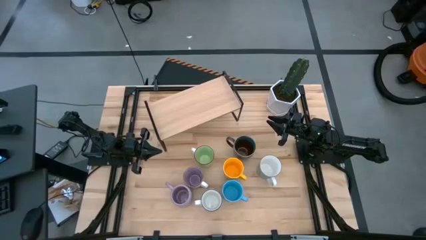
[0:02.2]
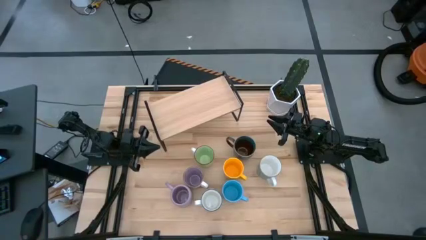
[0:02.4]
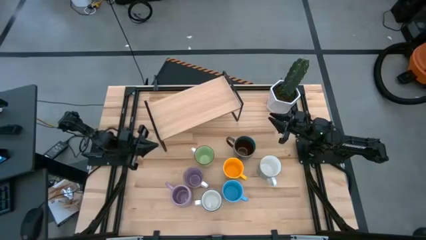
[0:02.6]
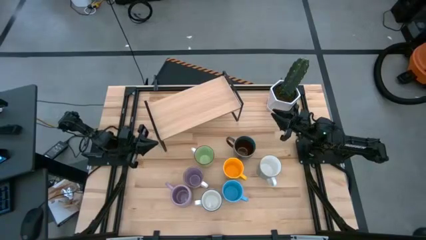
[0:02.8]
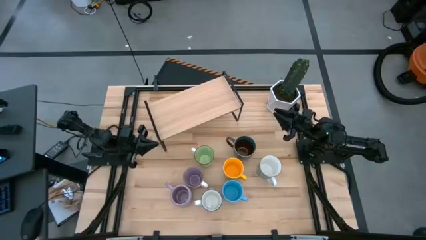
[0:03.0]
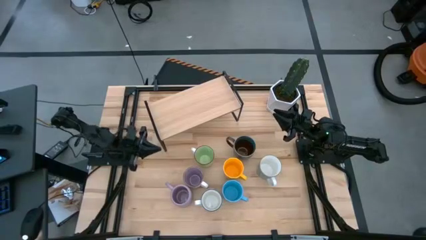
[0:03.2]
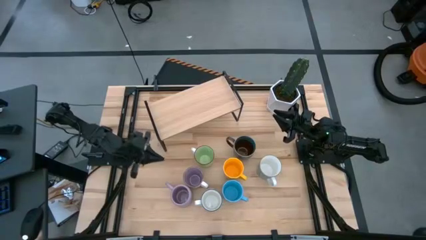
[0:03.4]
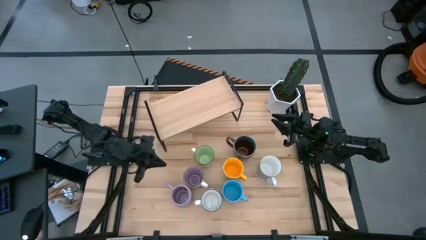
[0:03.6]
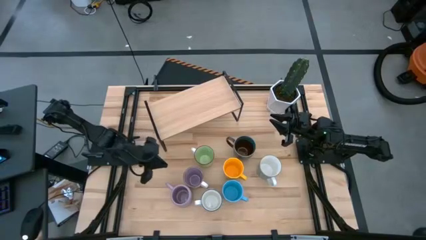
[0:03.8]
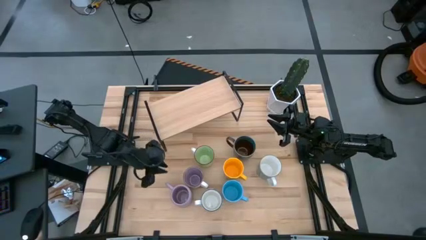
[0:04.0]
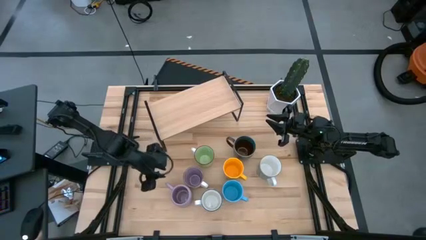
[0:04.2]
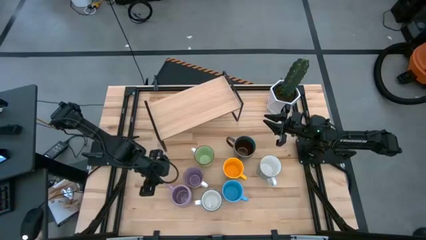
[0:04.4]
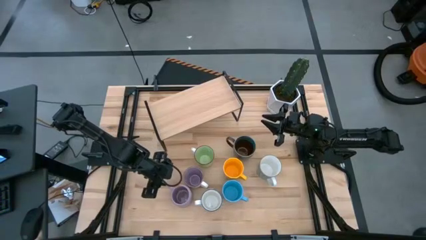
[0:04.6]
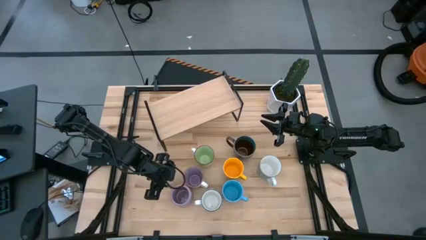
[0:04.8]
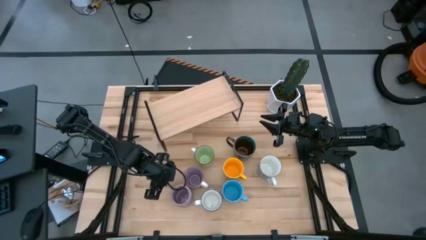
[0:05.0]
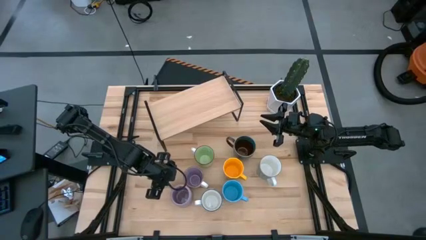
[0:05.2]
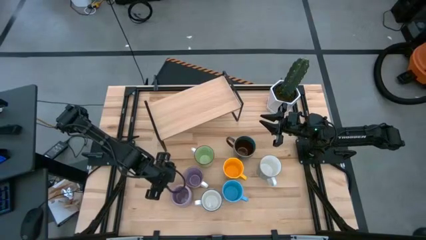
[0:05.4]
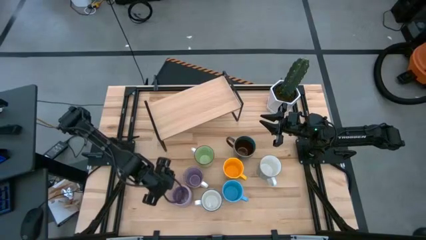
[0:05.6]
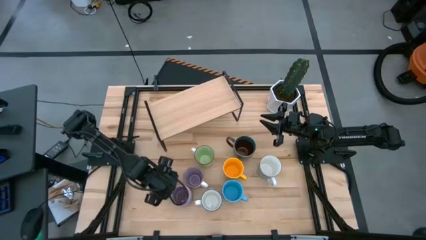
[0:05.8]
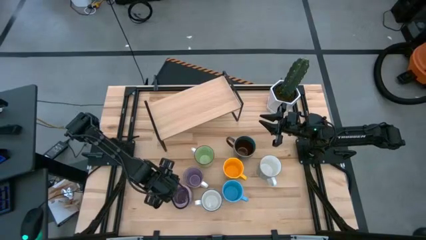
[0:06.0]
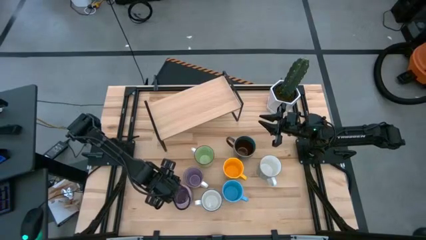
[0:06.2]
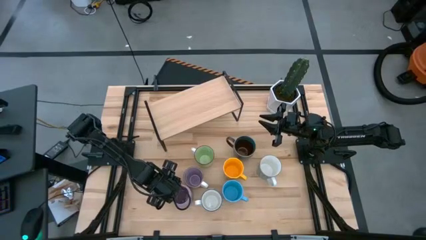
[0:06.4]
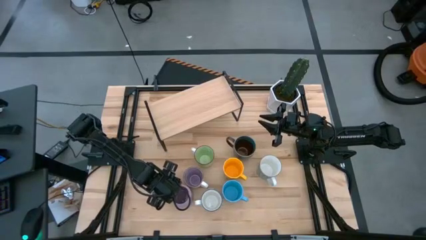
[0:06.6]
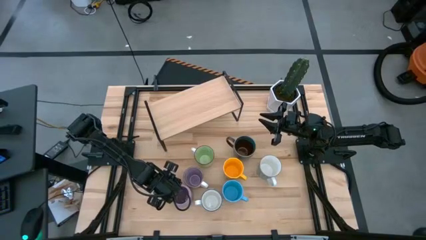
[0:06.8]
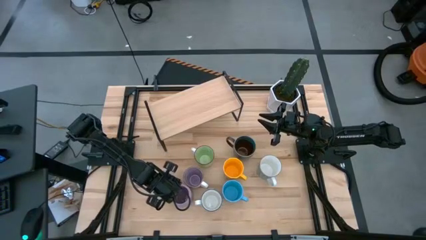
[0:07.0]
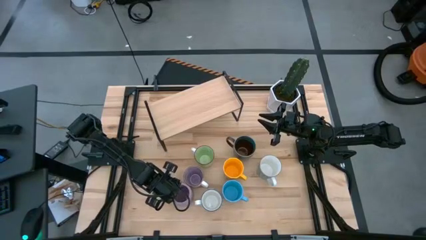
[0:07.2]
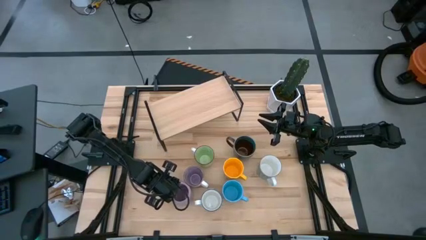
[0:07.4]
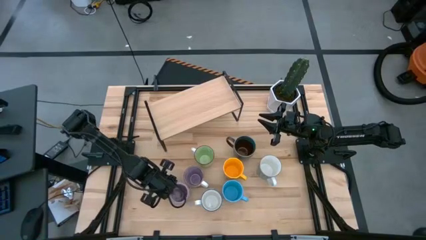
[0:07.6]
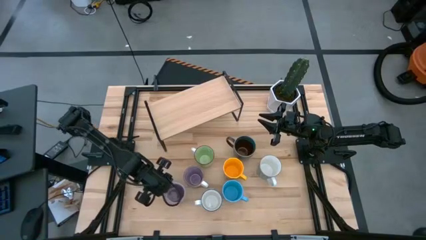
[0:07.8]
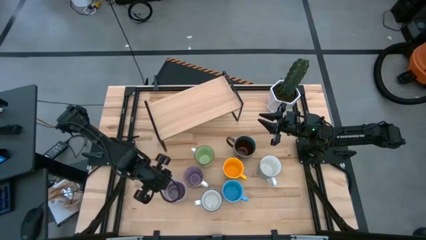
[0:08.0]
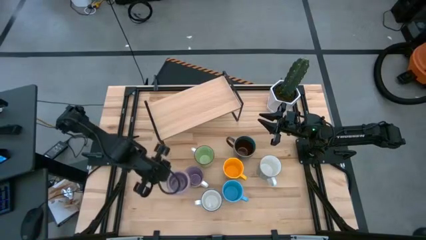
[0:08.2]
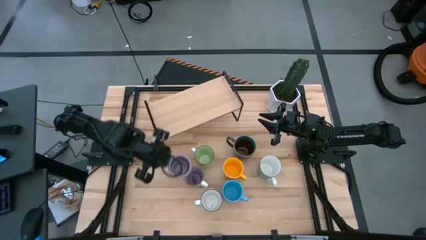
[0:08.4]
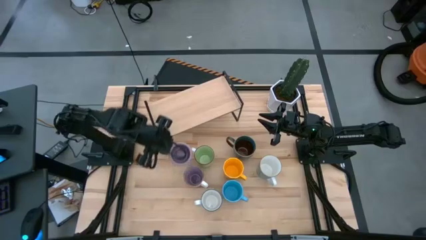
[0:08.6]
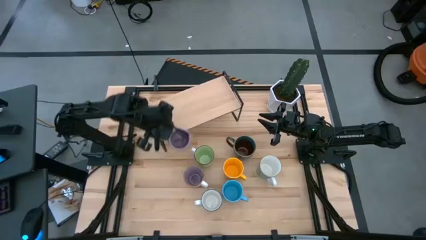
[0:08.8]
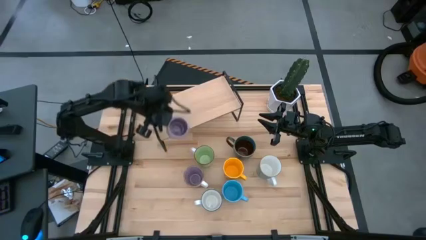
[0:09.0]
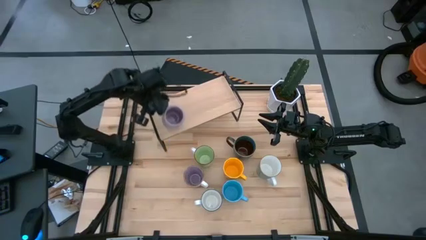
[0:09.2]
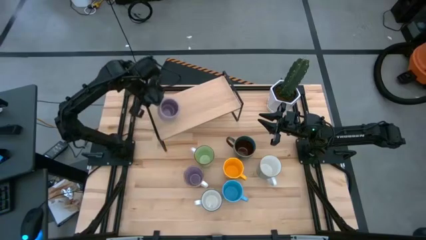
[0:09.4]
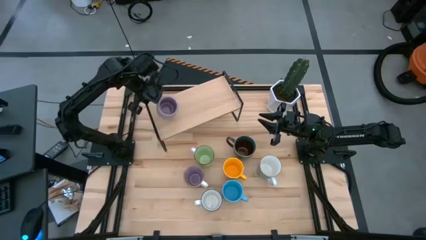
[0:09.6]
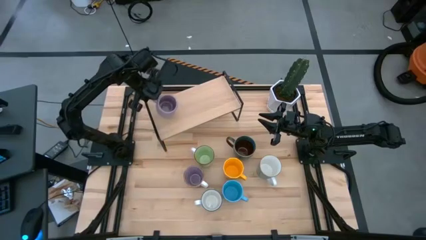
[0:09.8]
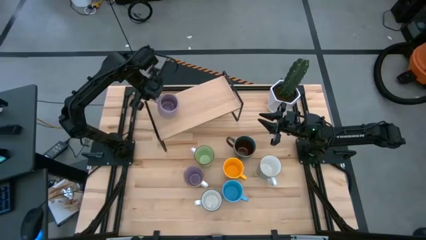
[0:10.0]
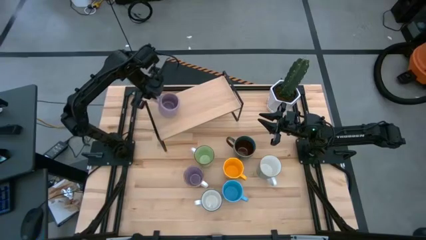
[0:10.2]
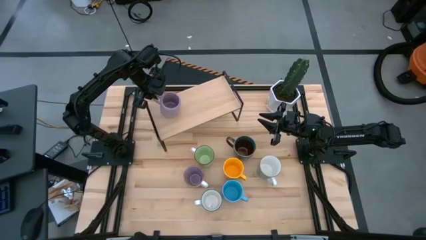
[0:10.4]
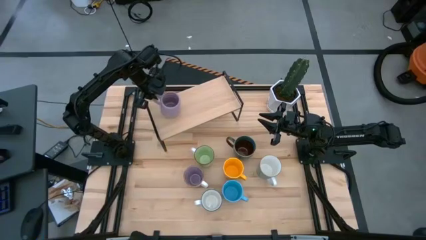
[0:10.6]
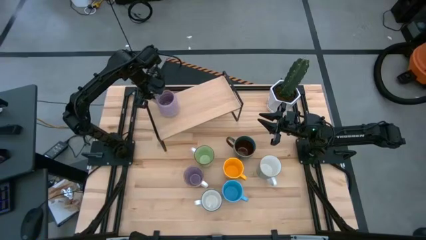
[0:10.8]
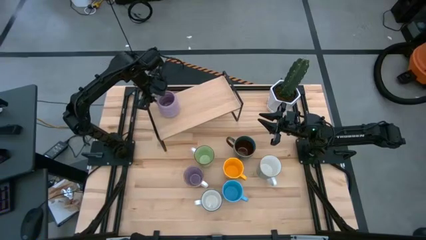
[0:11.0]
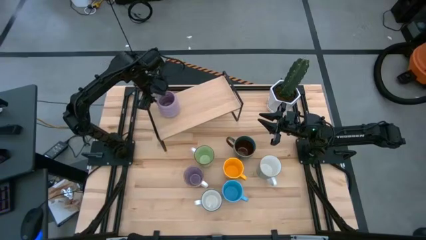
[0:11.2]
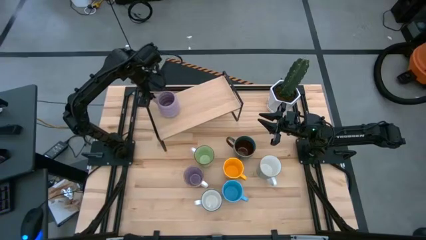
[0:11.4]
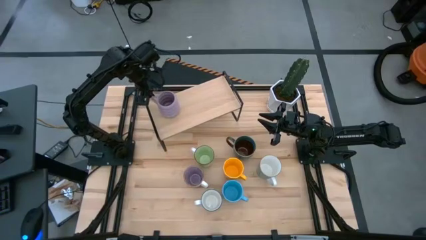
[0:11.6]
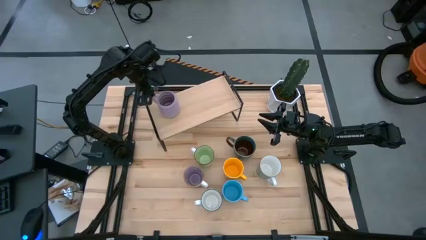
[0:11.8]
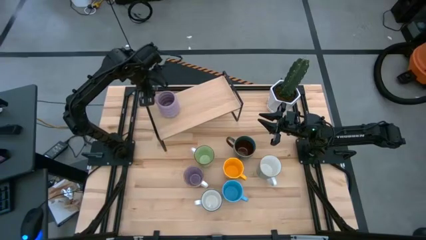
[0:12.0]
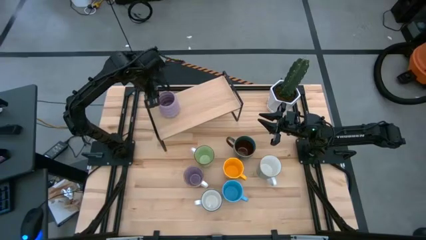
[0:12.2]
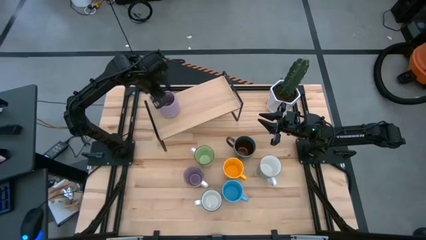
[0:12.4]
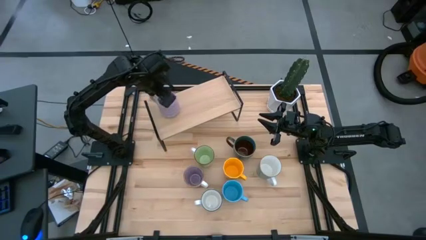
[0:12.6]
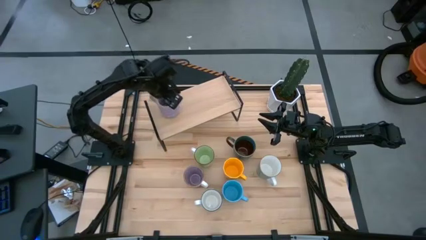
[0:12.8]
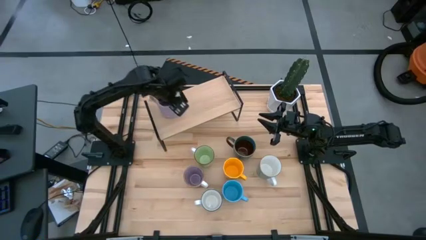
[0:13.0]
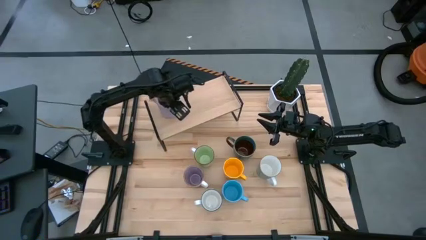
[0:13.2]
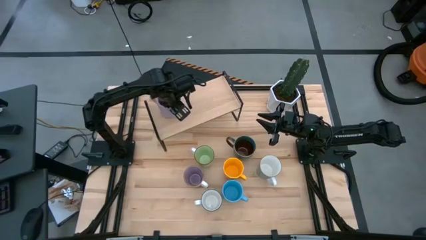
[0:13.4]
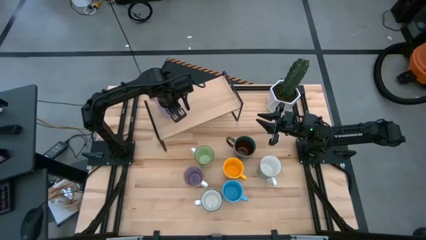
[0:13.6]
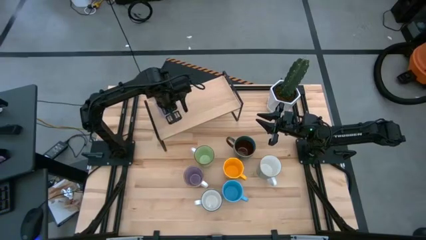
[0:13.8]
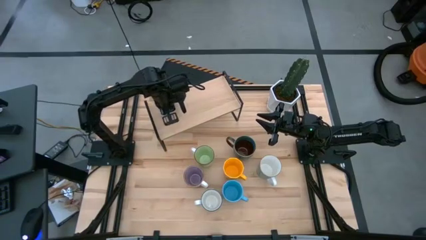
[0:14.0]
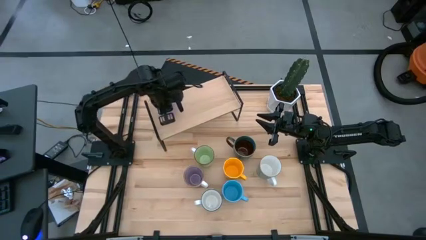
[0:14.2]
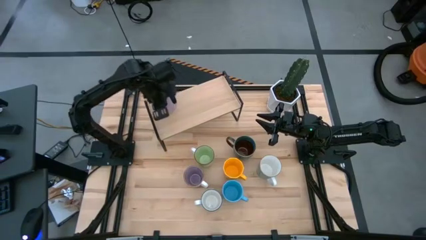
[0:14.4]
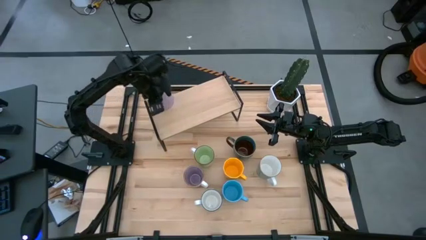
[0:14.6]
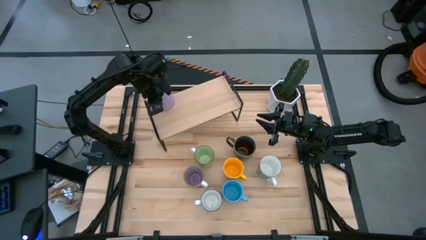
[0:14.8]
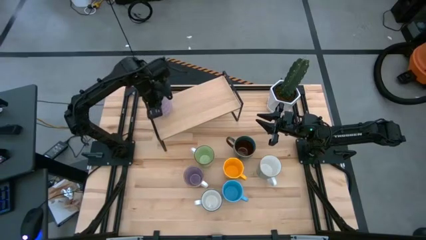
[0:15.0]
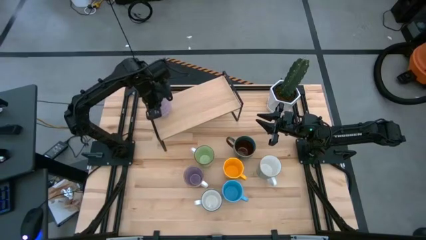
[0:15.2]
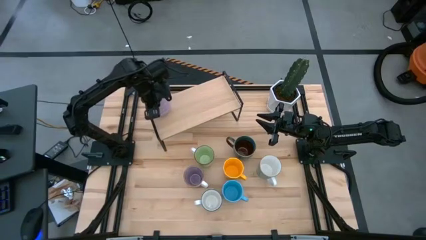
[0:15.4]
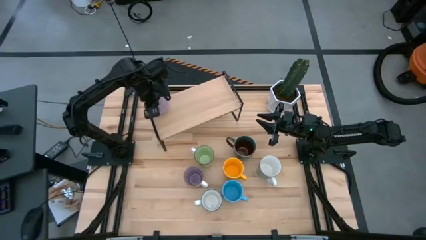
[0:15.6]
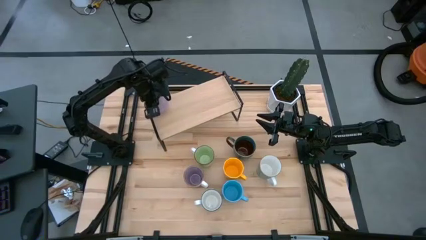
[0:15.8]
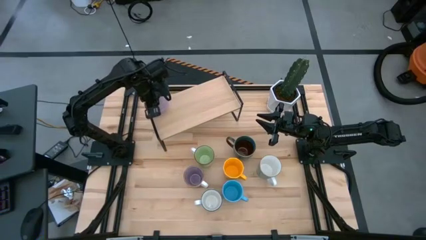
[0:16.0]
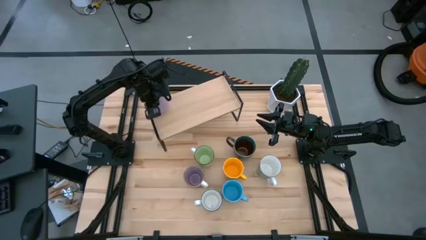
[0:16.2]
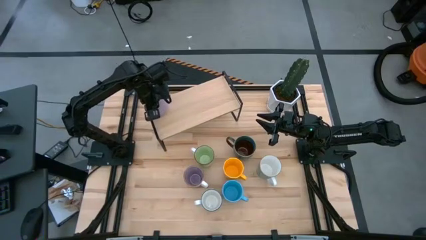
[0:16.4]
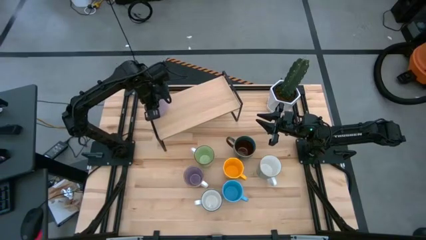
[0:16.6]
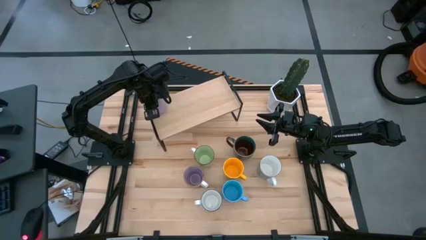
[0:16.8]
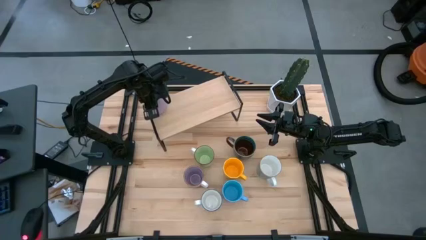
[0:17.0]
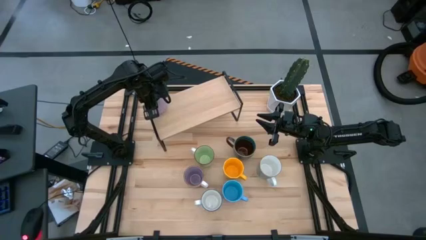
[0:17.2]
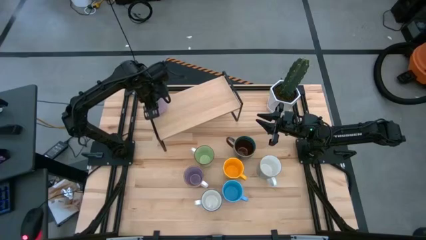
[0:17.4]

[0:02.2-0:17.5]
Task: Place coffee mugs
Put the bottom purple mug on the shelf
